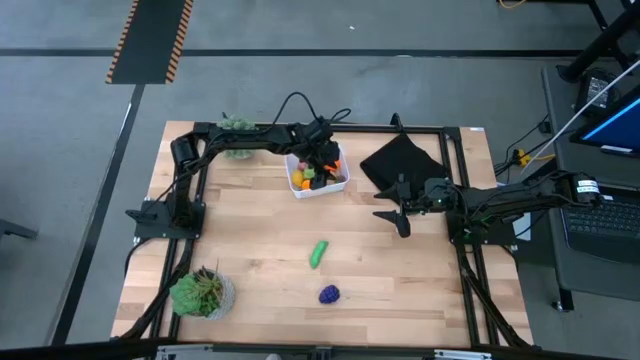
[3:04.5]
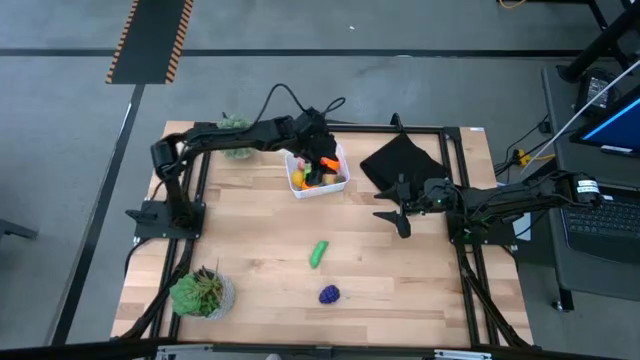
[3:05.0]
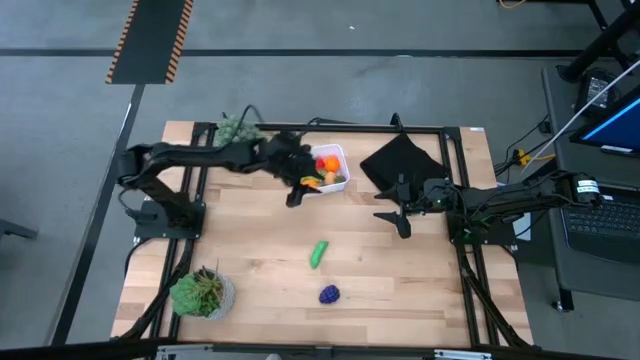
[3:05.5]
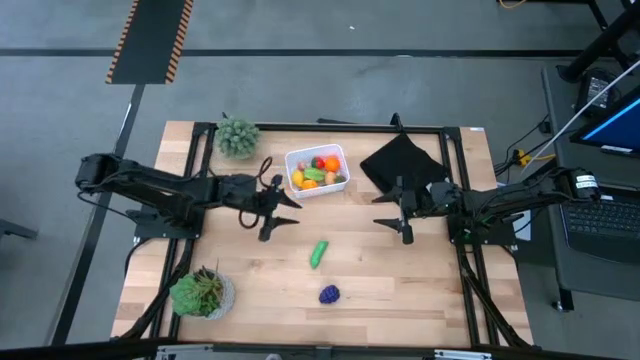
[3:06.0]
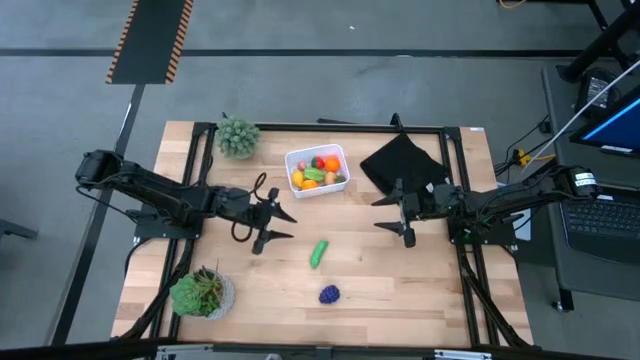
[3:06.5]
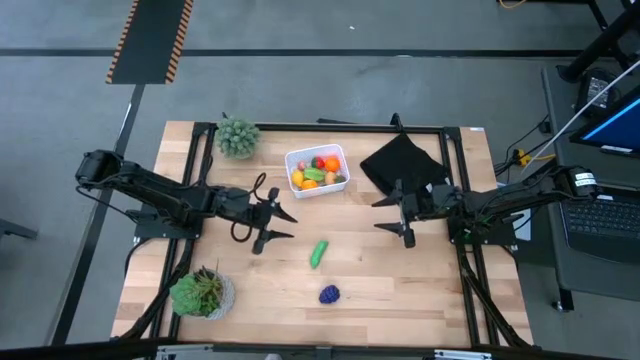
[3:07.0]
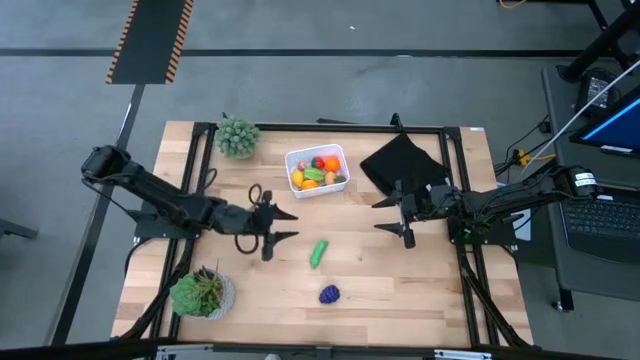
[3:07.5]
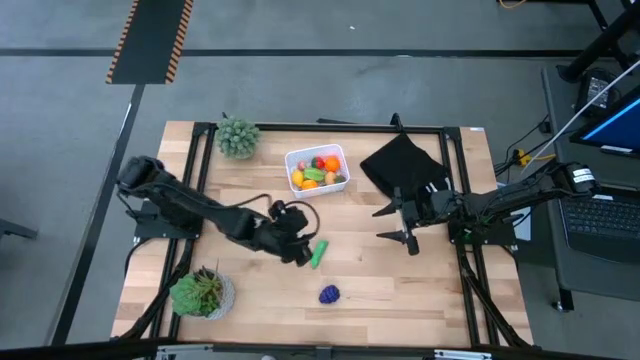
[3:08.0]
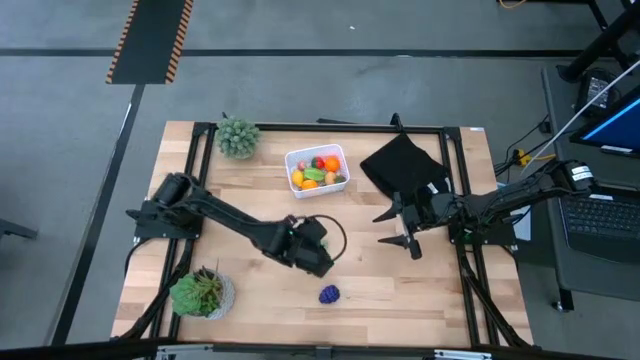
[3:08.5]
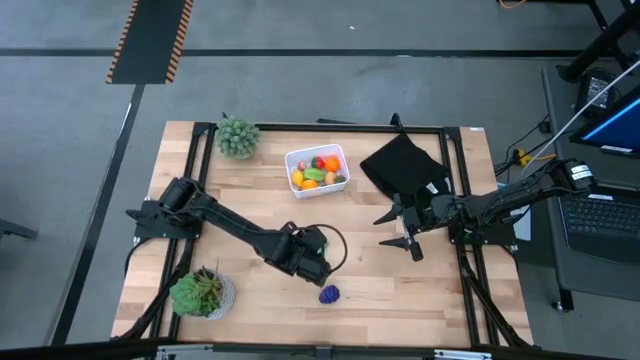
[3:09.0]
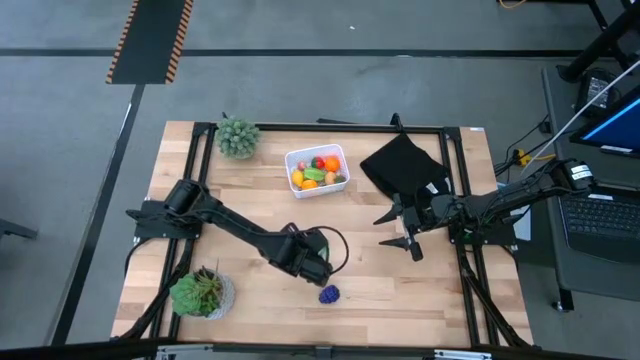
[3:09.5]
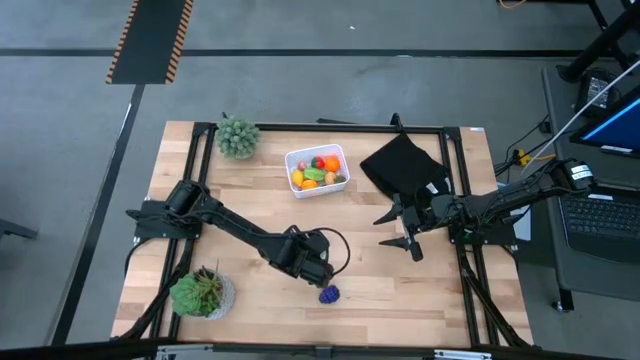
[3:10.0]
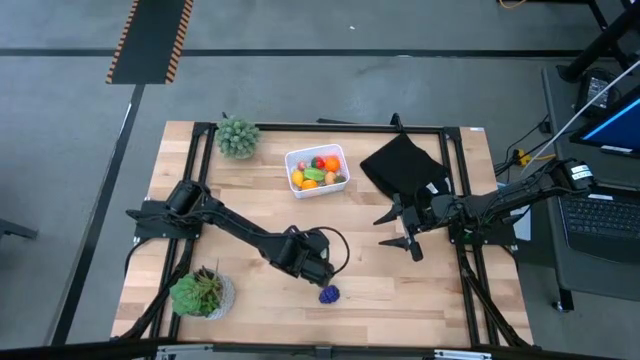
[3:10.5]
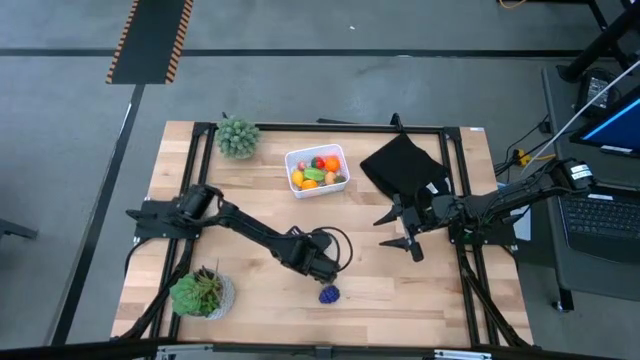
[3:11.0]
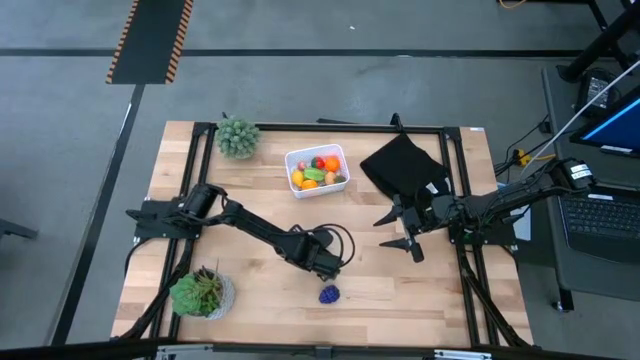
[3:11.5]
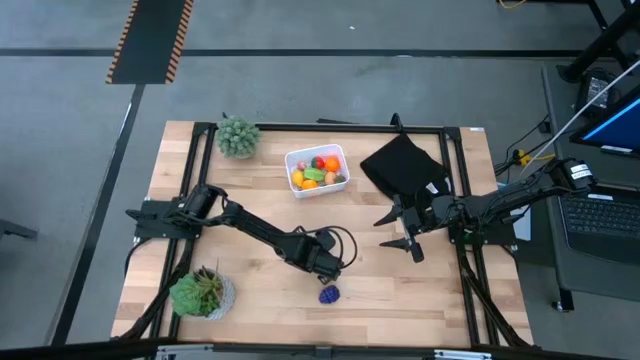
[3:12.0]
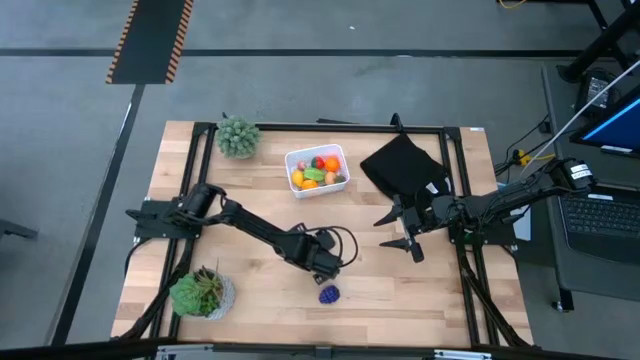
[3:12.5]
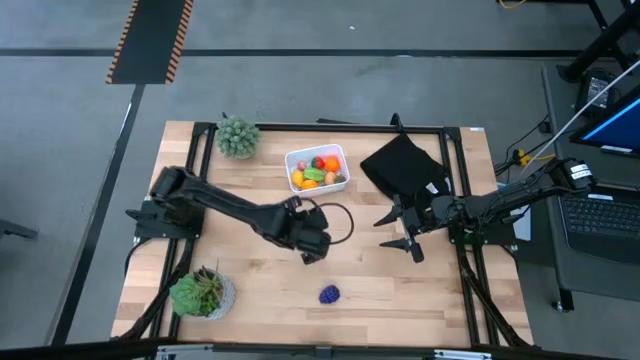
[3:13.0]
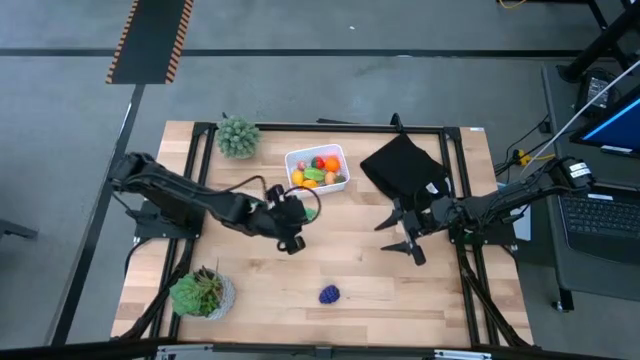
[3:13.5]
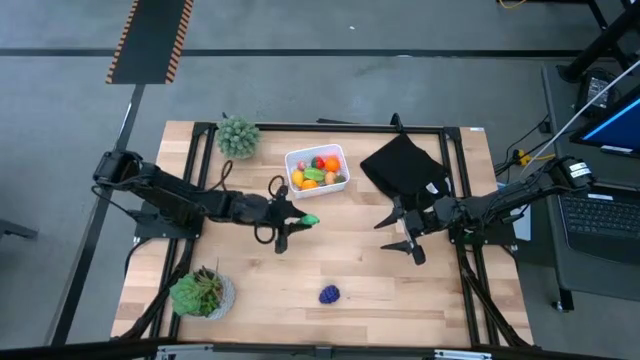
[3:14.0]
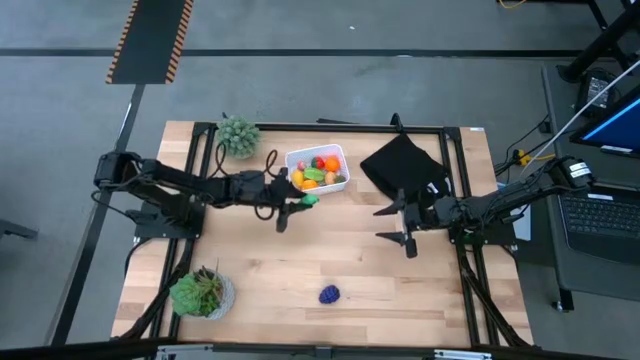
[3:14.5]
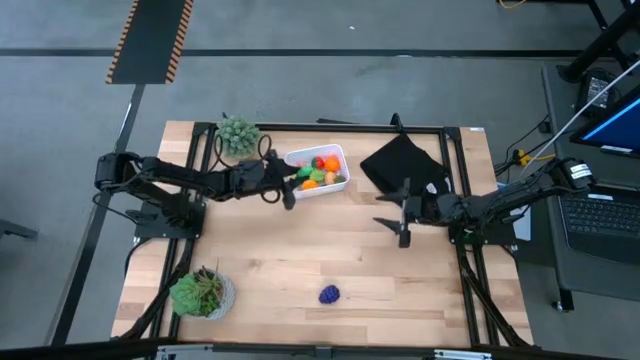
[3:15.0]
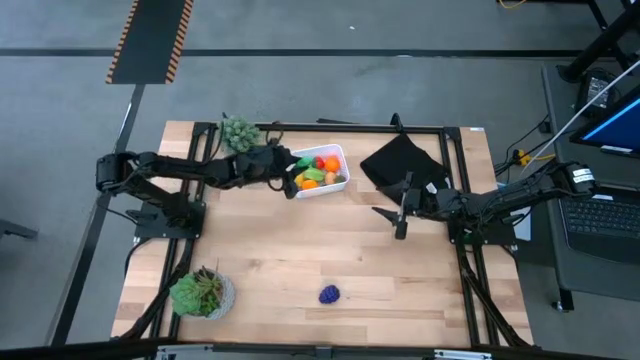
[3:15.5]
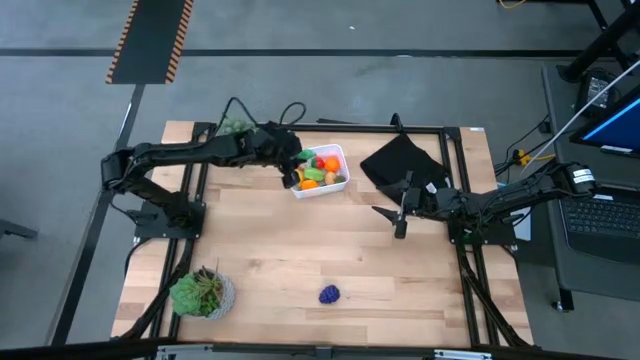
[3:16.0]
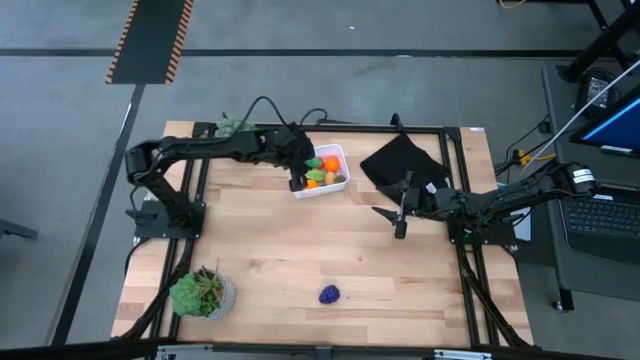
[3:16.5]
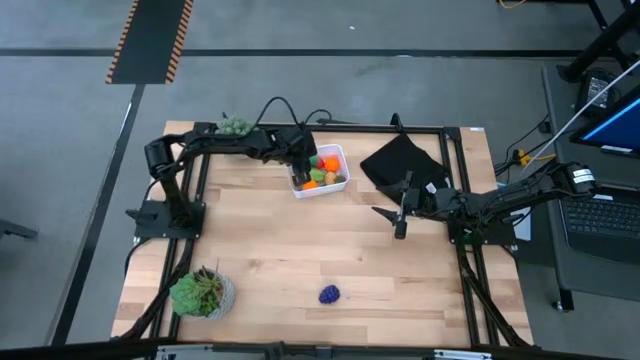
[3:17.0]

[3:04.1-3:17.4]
Task: Pick and placing Produce into tupperware
Put the peas into the white bin

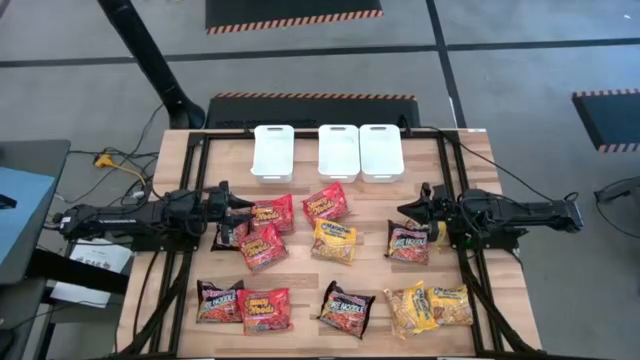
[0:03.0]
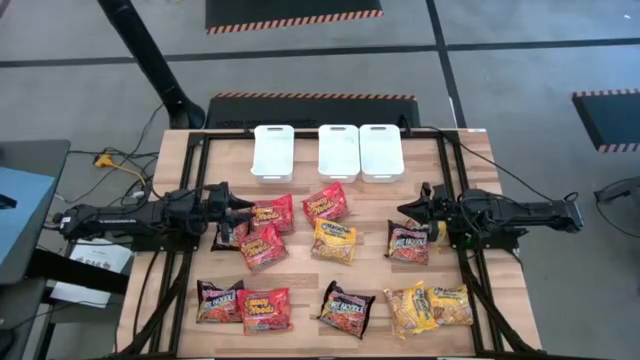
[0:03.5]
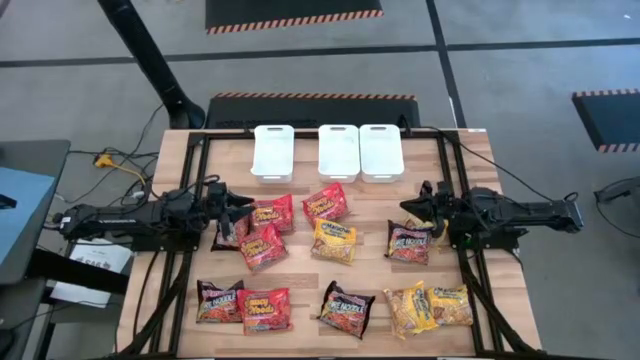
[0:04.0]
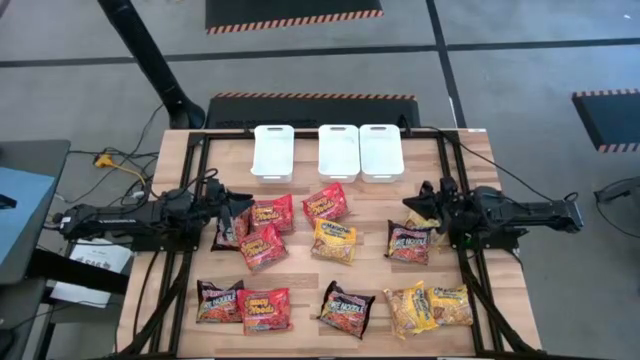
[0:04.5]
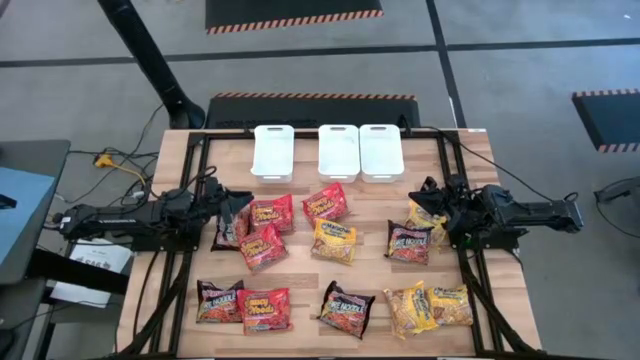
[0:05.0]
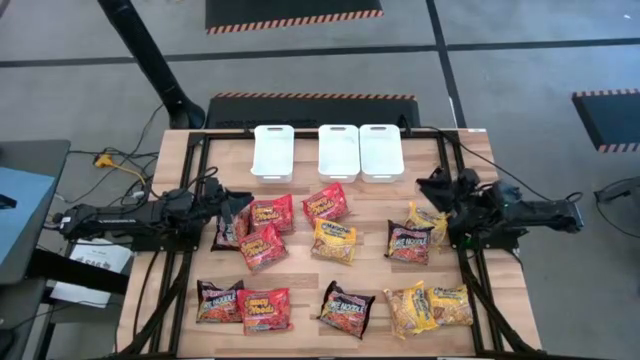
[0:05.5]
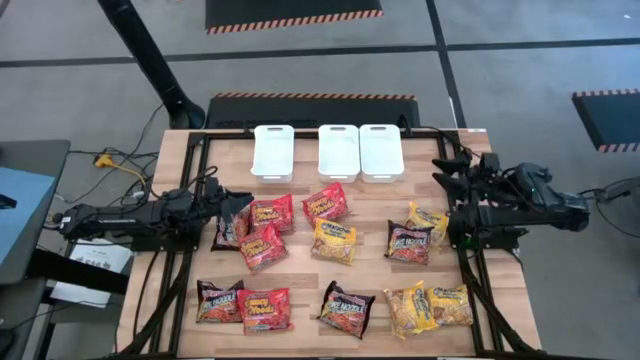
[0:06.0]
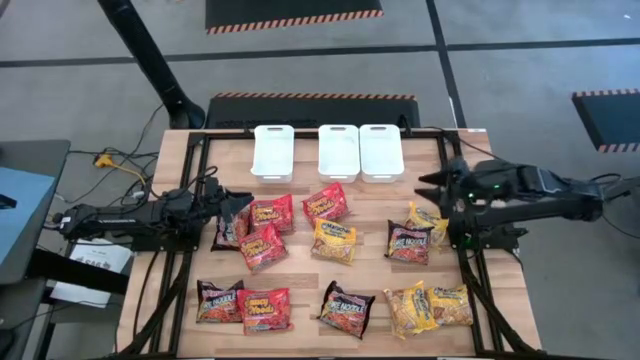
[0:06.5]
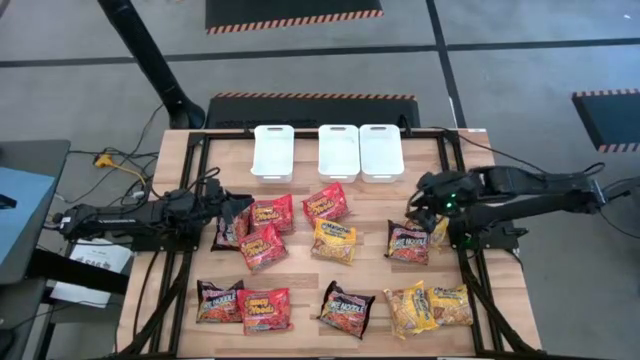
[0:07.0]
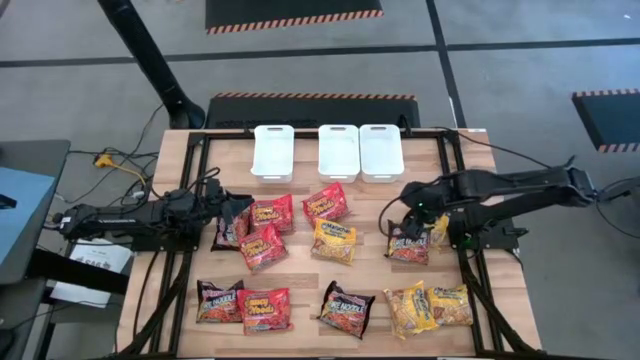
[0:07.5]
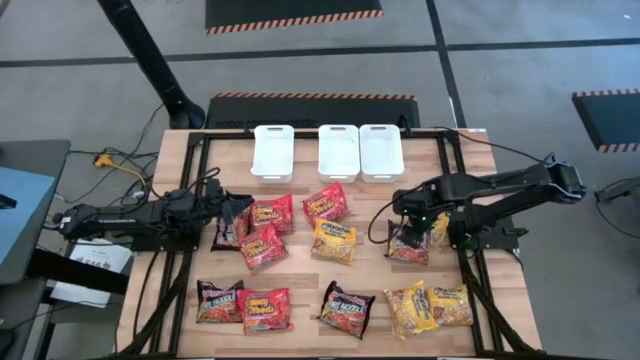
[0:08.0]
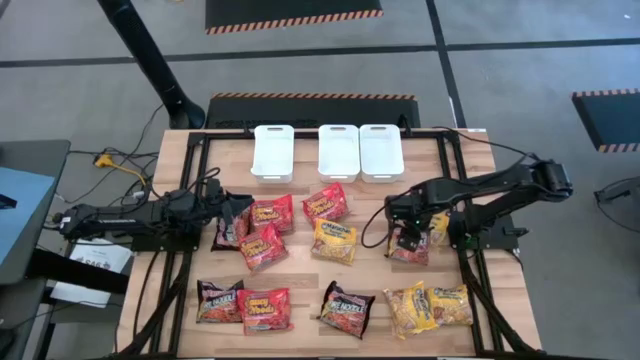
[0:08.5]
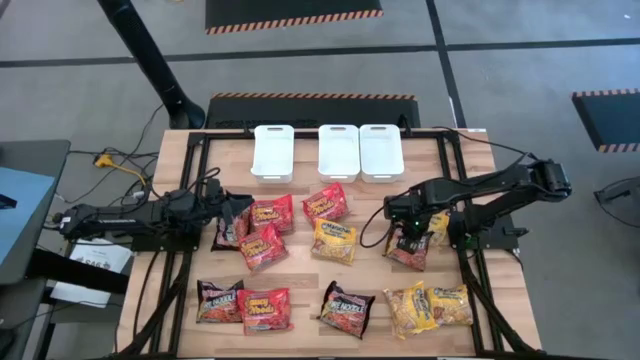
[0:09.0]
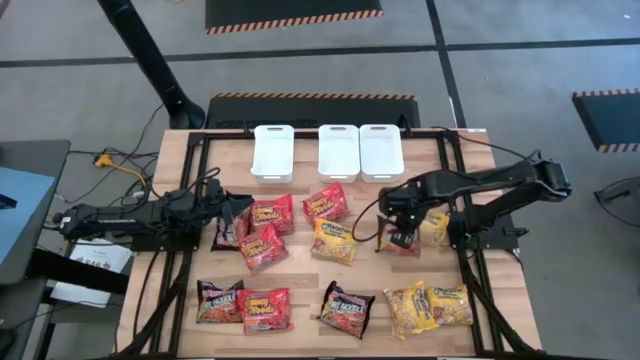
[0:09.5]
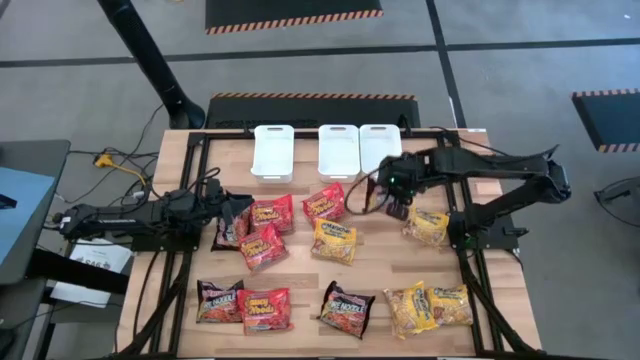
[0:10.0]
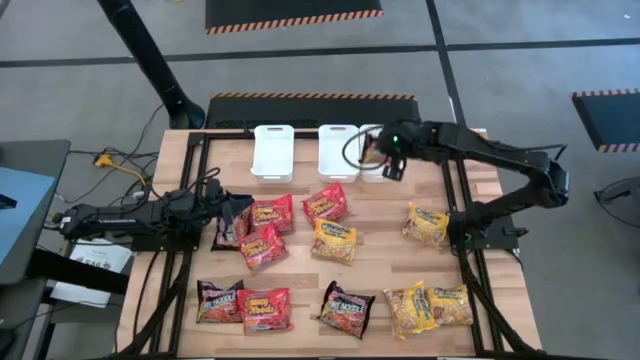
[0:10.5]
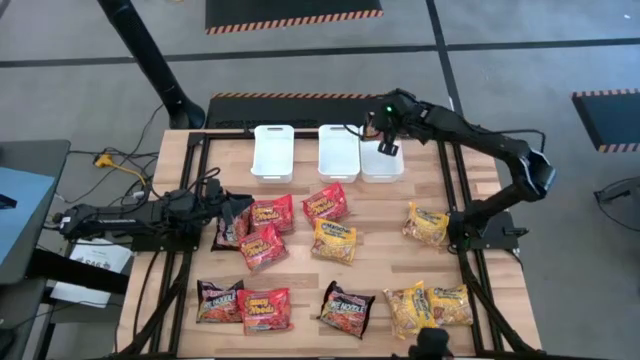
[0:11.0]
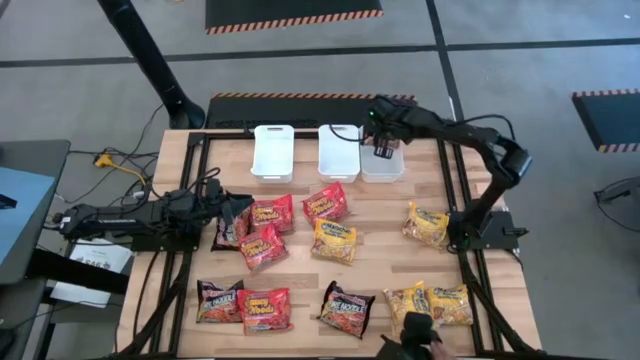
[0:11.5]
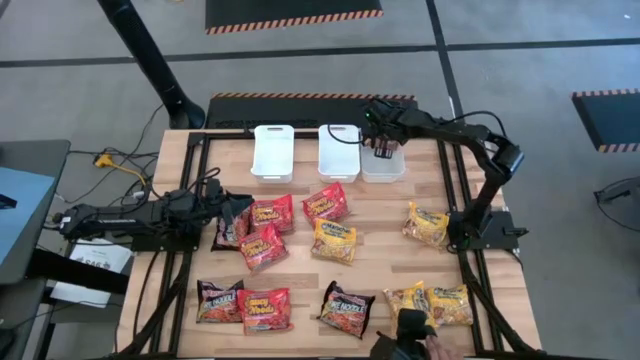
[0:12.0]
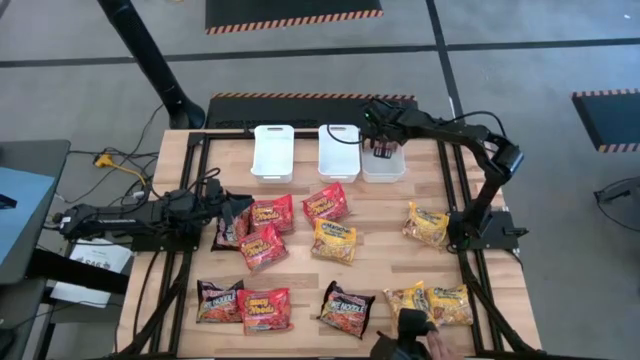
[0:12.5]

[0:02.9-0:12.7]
Task: Sort Maruchan noodles
Put the black noodle pack into the right white bin
